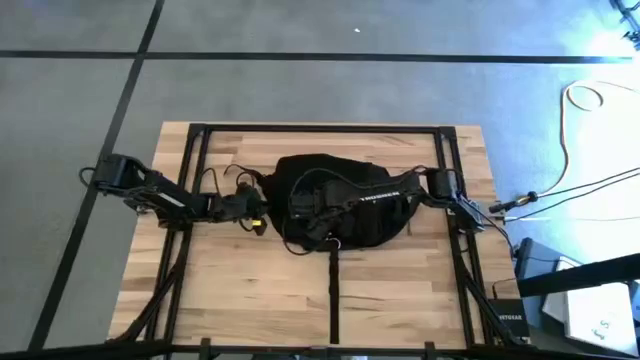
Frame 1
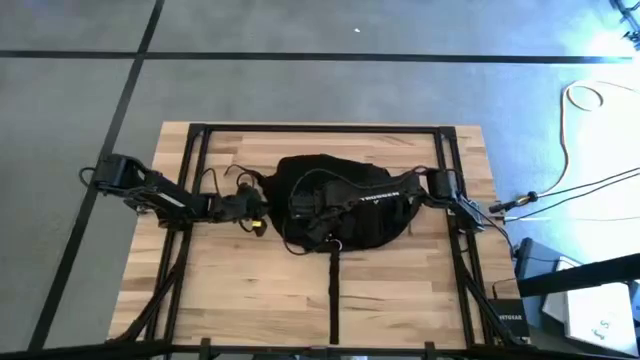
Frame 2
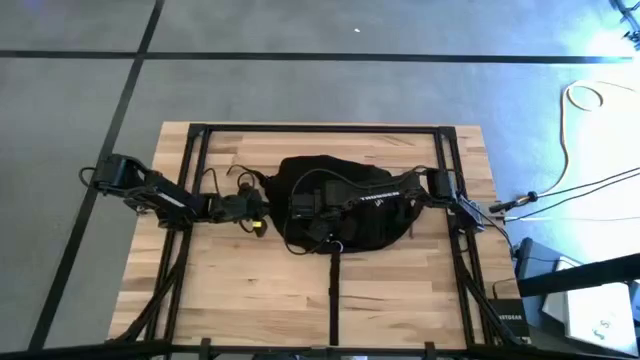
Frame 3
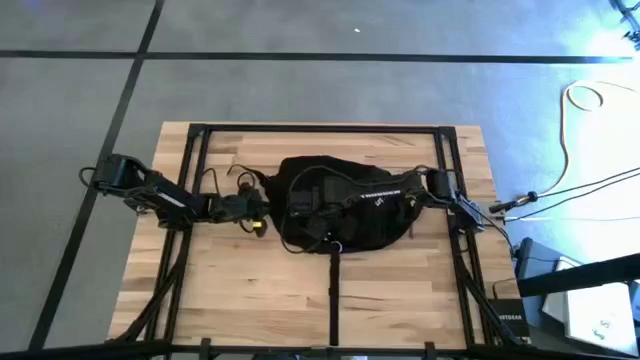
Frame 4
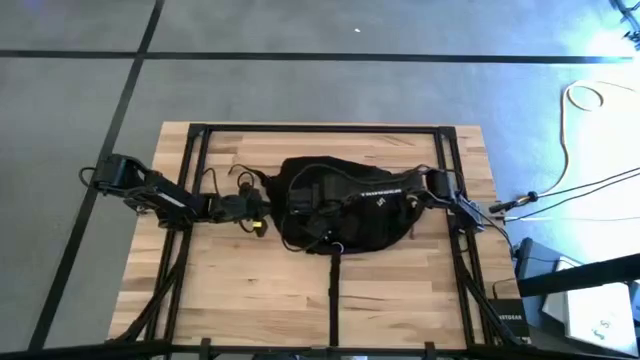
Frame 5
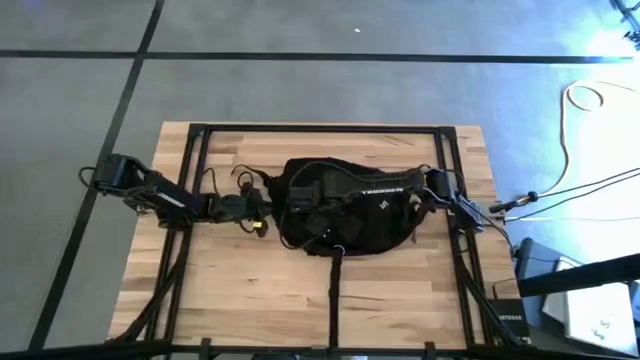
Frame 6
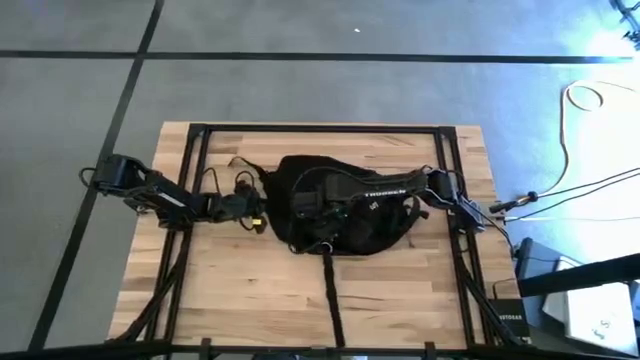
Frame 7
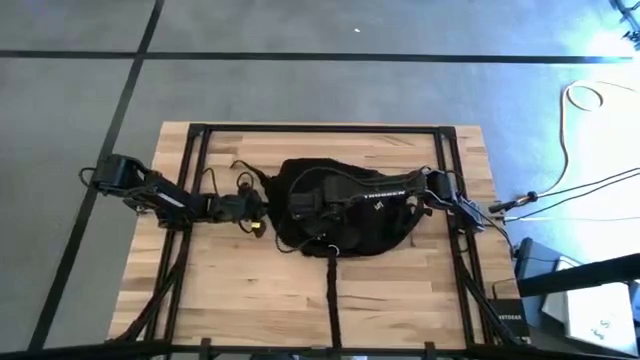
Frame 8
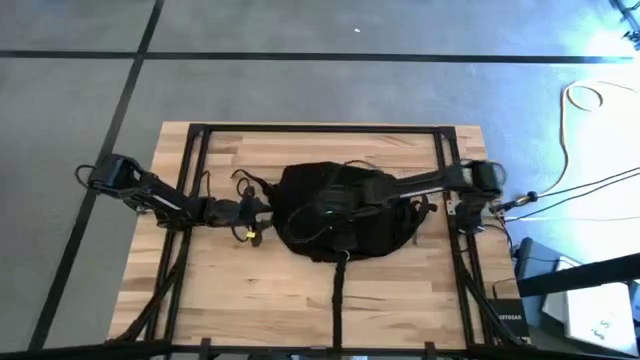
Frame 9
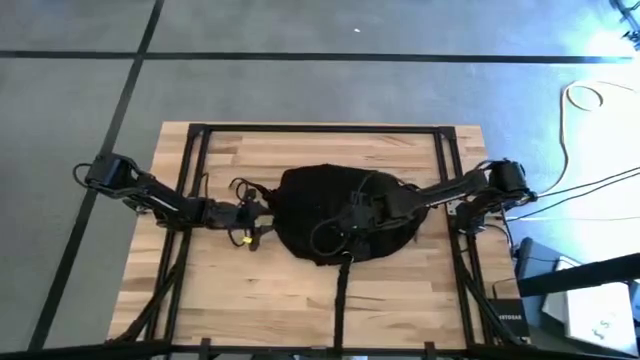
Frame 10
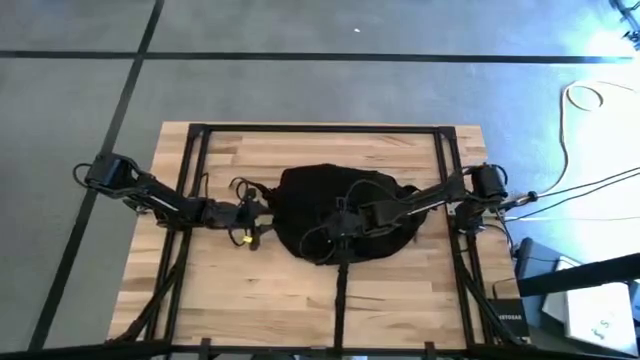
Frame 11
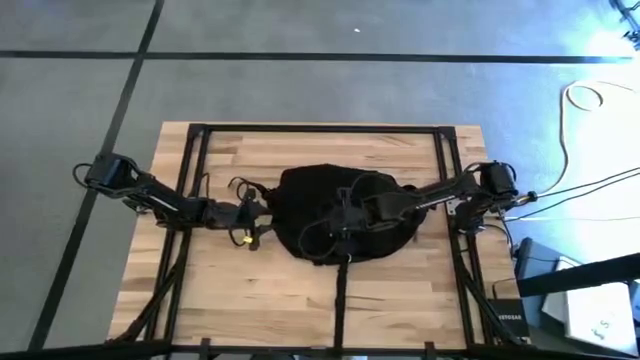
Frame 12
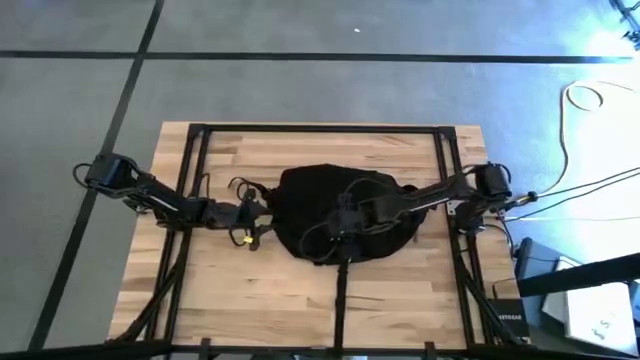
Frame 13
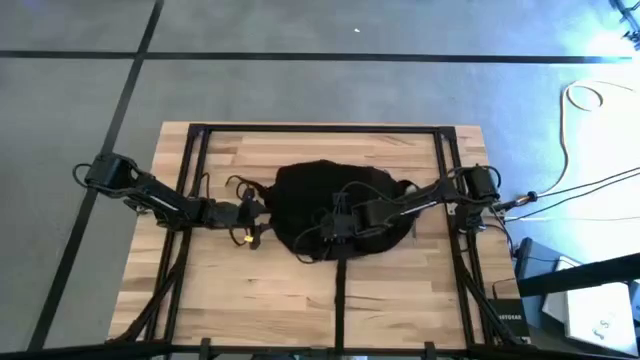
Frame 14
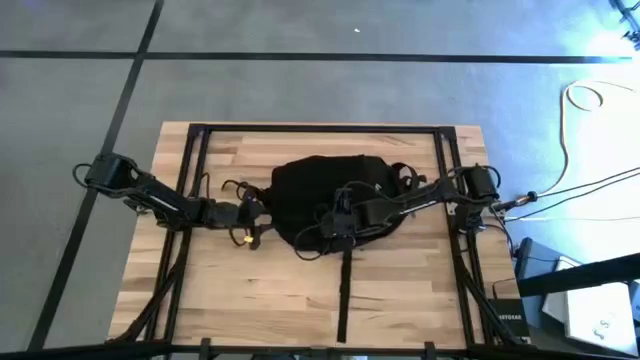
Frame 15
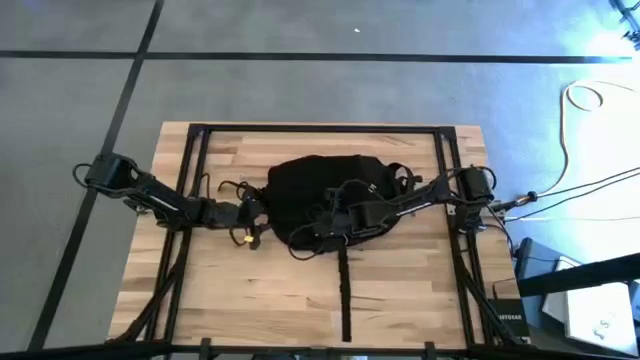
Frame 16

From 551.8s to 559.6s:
Task: Unpack backpack
Close the black bag

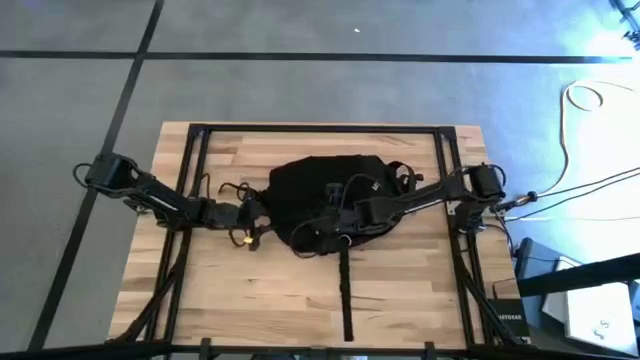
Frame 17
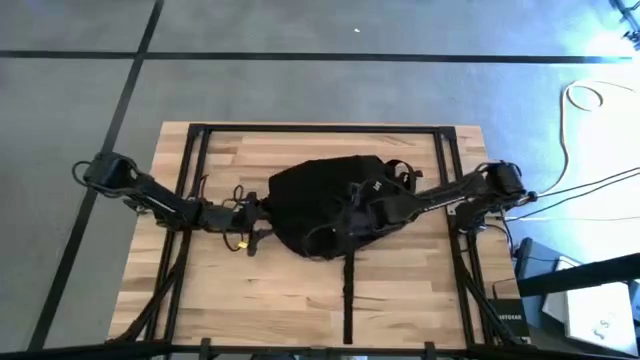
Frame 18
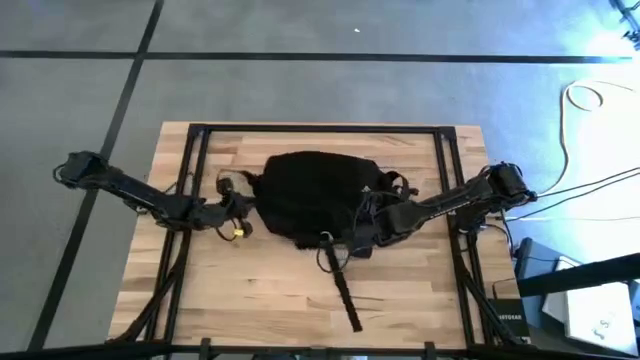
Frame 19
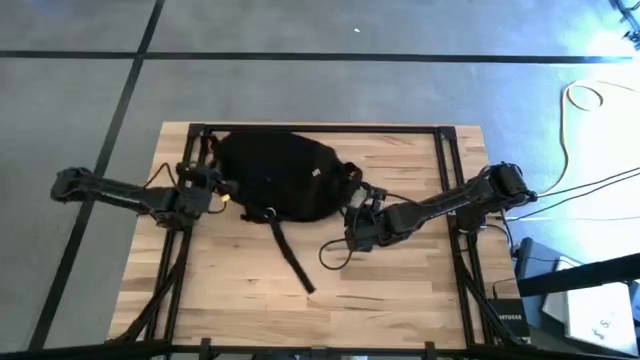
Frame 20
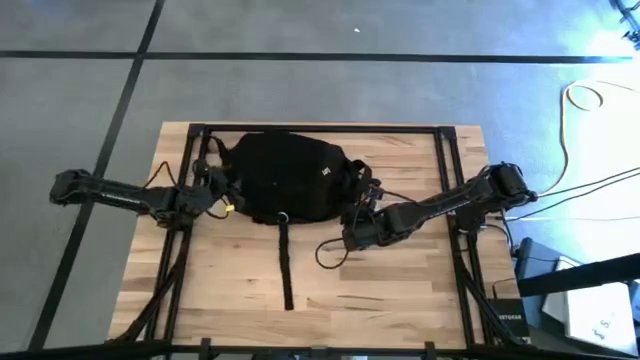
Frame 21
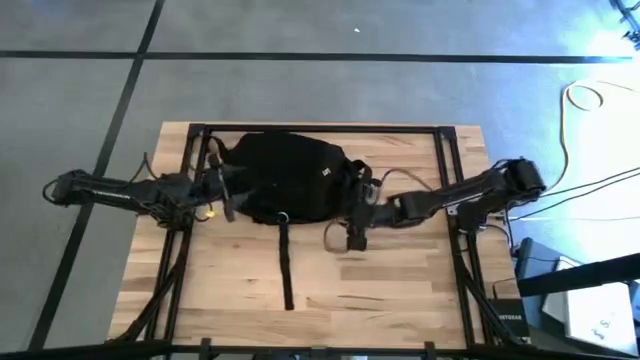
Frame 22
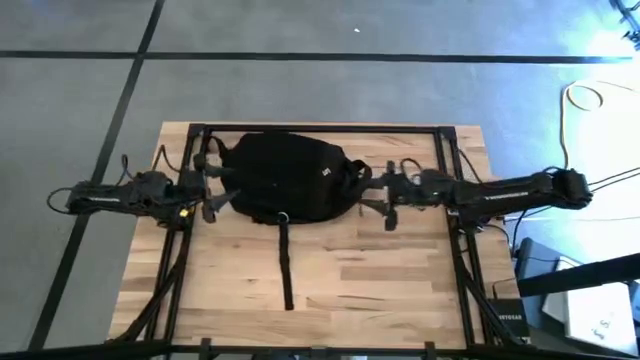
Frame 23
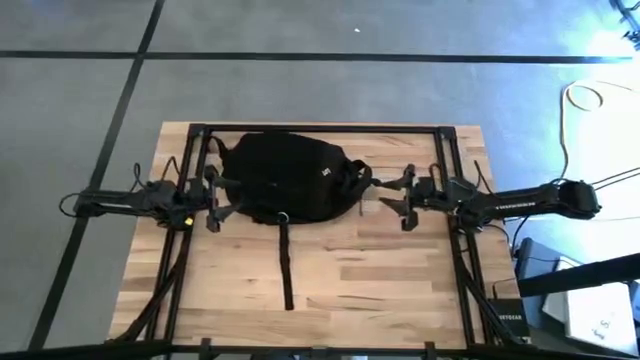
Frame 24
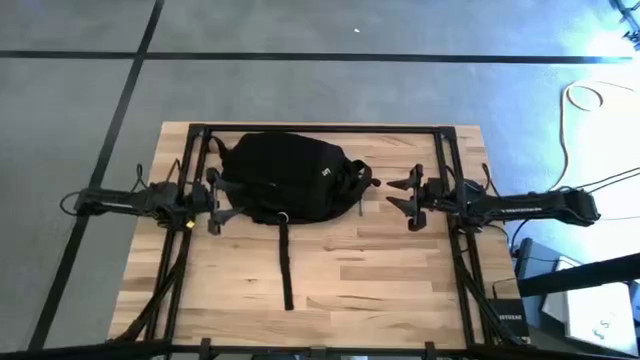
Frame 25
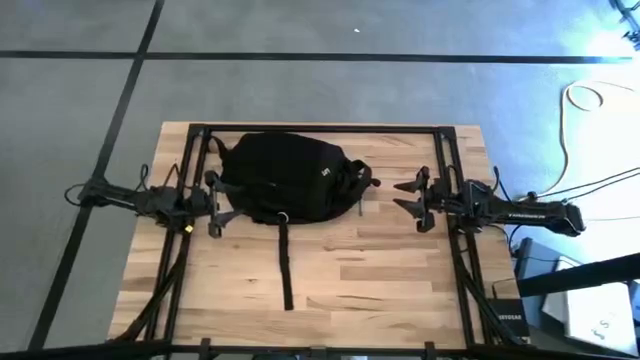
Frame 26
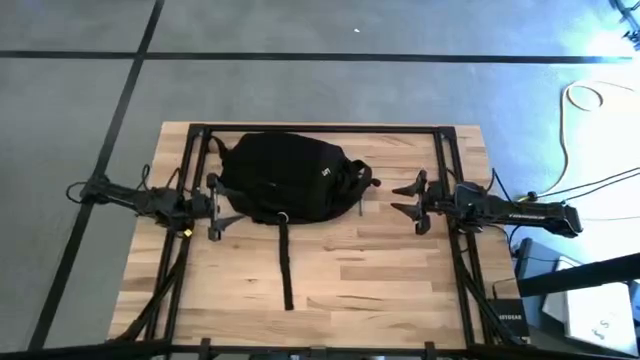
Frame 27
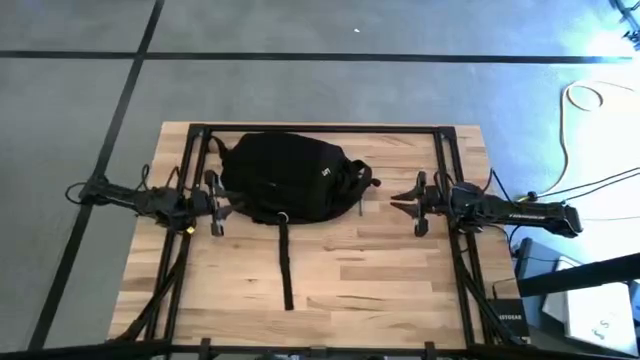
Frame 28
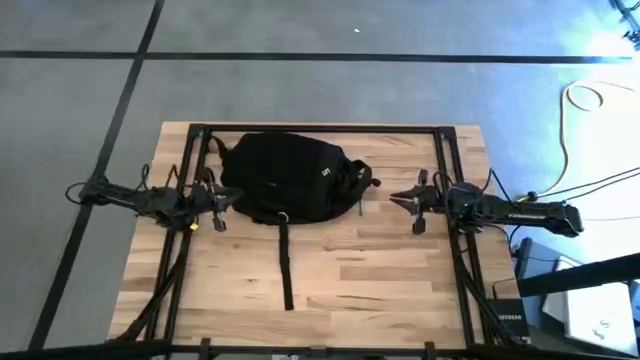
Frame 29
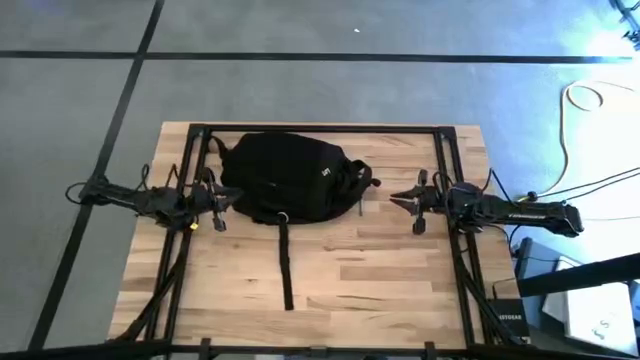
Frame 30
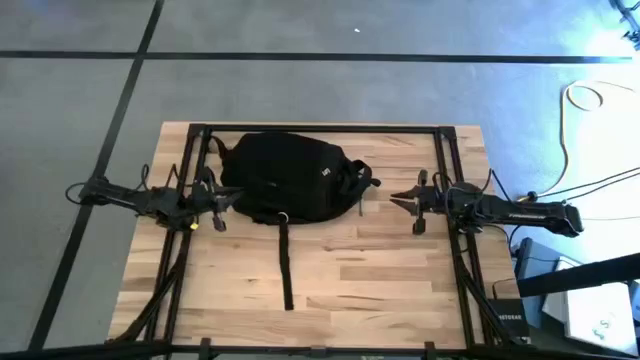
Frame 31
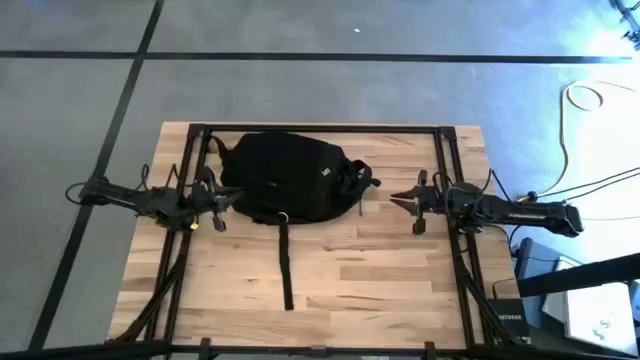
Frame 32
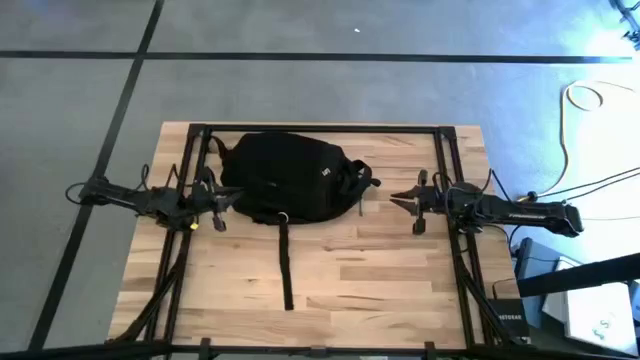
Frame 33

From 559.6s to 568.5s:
Return to Home Position
